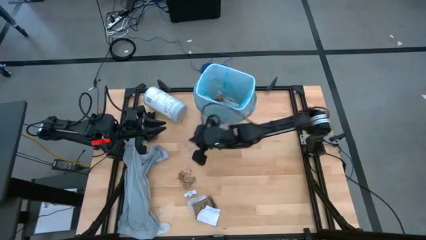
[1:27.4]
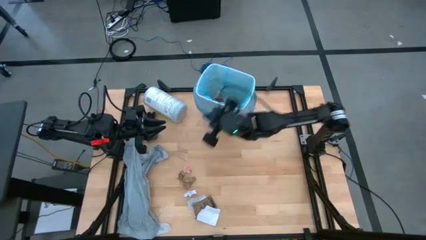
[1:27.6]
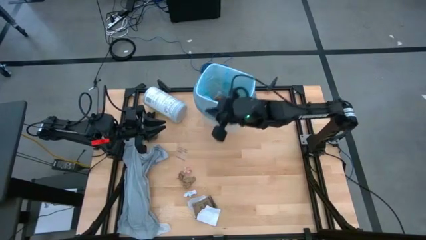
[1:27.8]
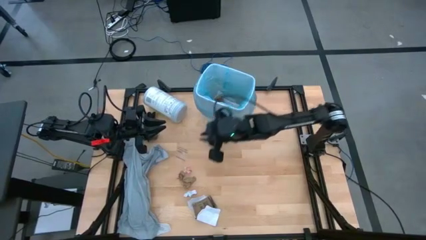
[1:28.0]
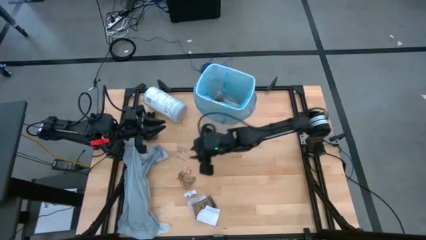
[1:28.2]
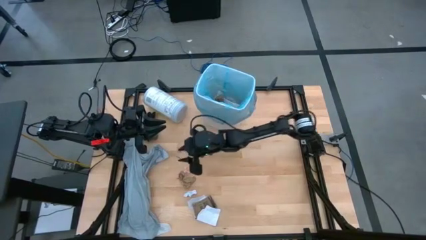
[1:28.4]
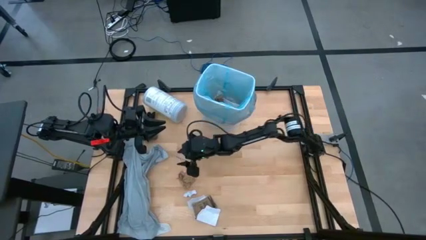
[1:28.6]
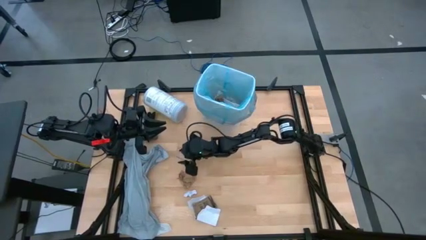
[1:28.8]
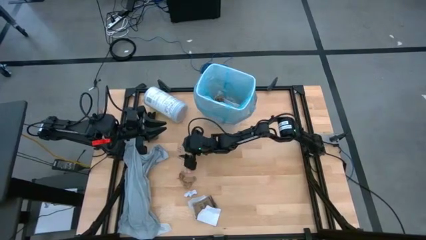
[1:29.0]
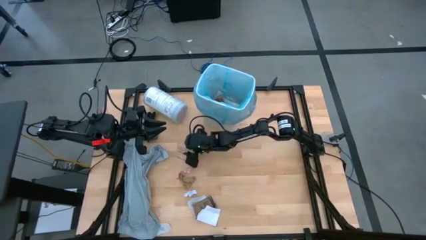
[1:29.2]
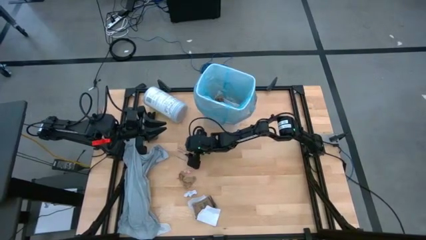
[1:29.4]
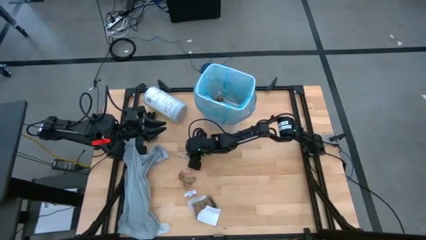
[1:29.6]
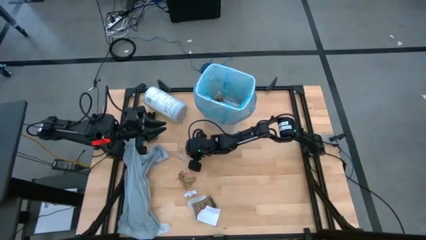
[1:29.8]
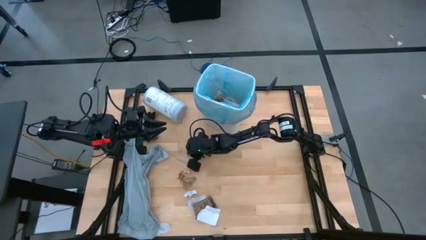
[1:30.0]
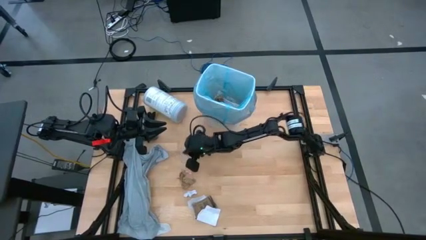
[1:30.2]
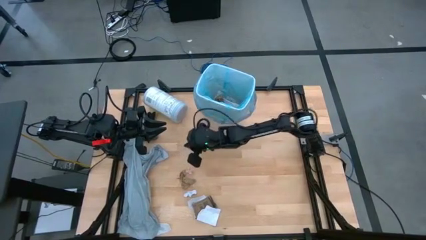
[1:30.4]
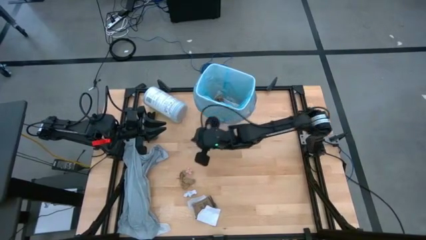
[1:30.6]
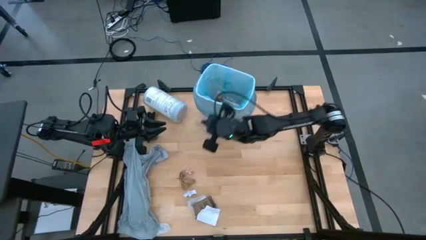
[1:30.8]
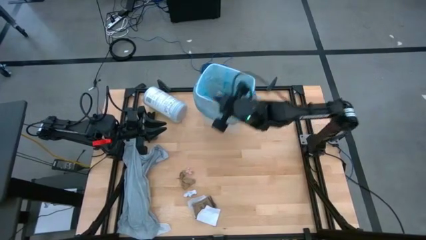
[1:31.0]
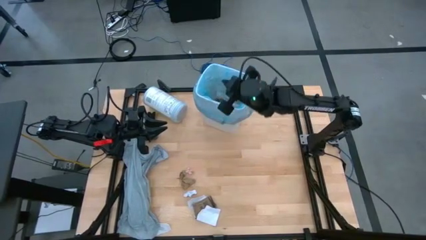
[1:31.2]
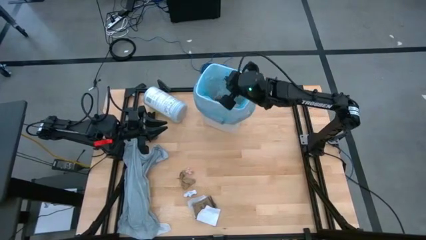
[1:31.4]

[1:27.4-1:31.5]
Task: place trash/remove bag and relplace
Put the transparent plastic into the trash bin

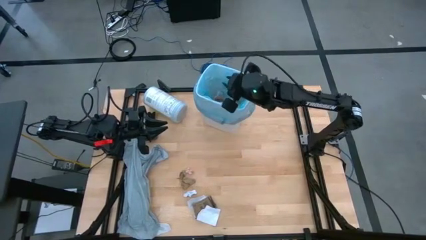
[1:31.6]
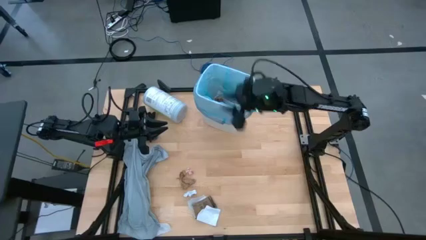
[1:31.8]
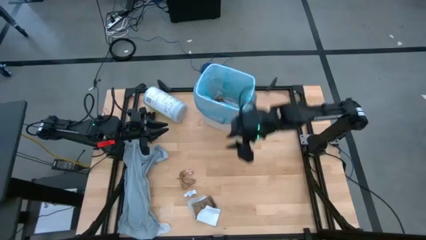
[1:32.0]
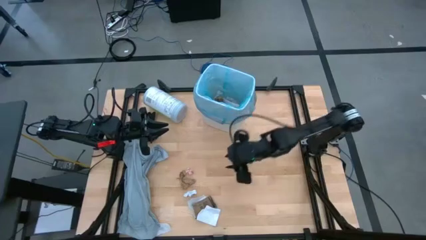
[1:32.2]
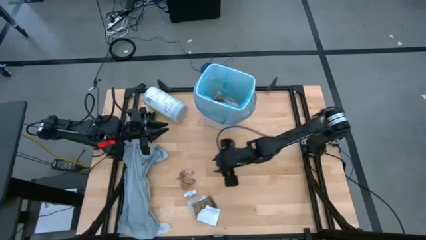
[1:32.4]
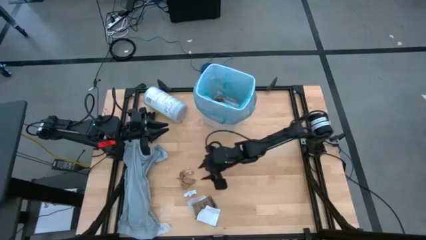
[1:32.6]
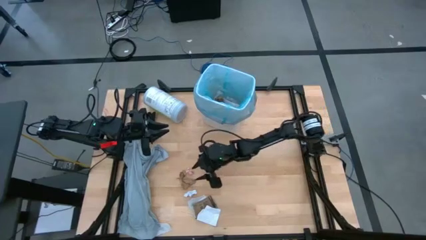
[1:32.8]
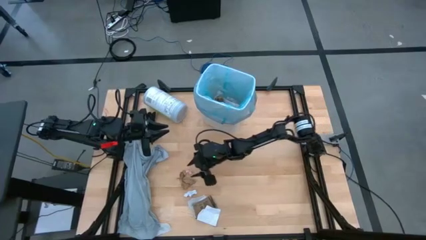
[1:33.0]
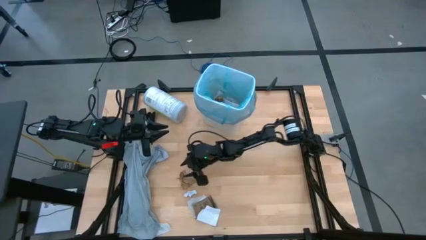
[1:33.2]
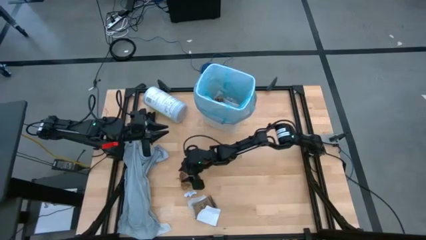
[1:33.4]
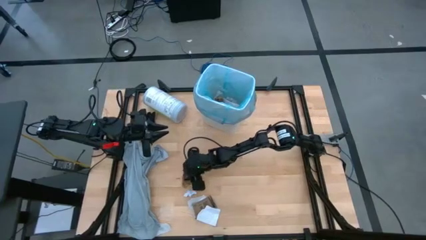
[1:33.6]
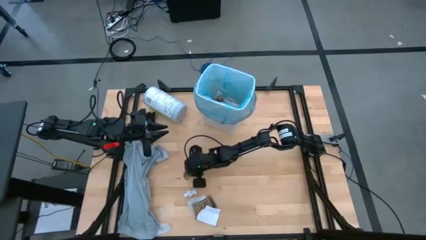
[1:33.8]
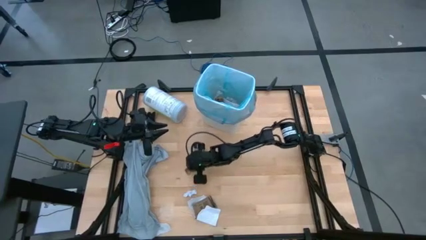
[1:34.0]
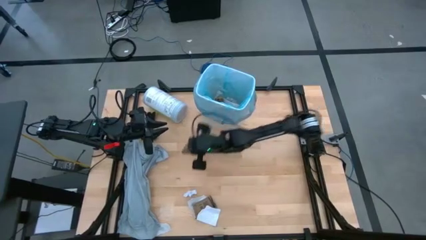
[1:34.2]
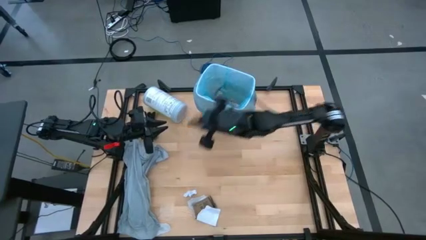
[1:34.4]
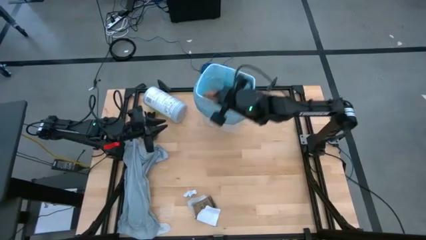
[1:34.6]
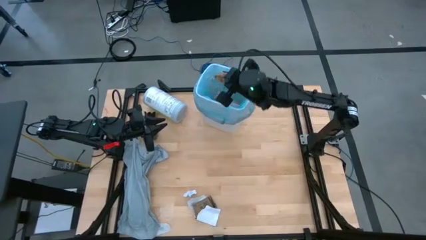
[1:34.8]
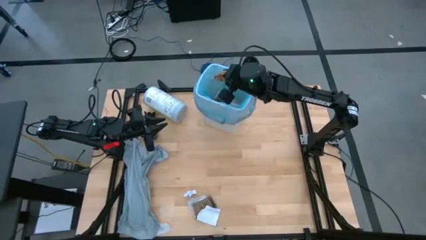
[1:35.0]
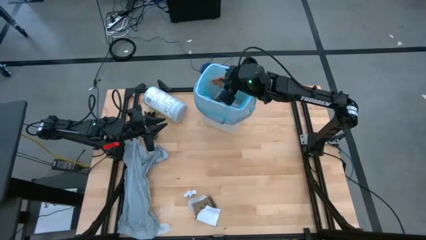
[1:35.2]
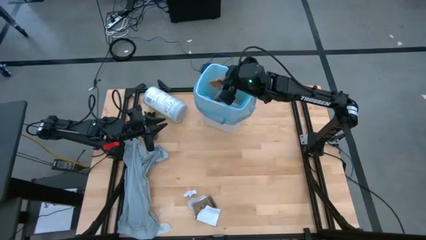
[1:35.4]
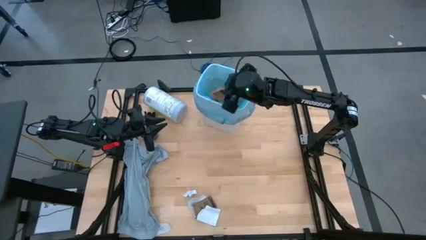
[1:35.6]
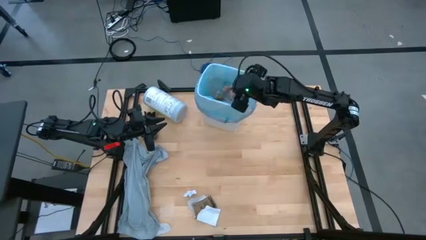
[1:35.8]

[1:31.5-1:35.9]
Put the brown napkin into the trash bin

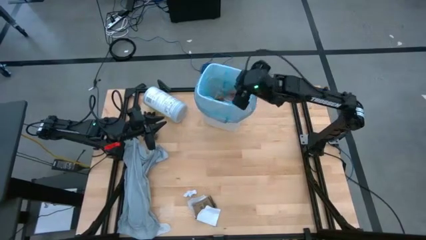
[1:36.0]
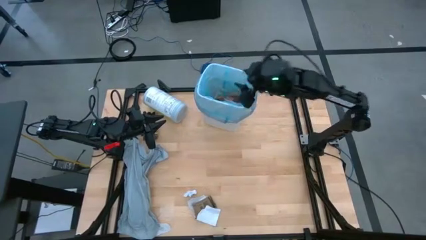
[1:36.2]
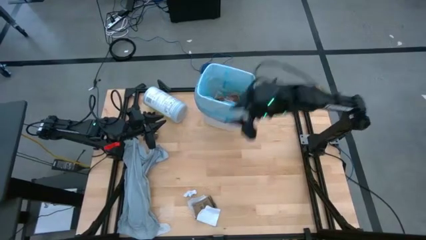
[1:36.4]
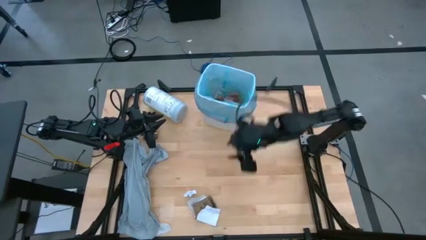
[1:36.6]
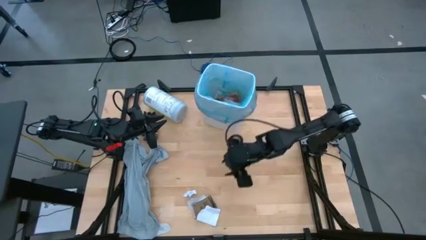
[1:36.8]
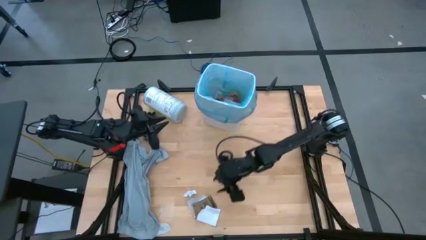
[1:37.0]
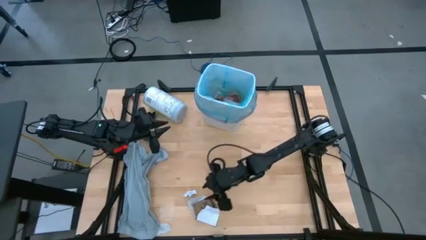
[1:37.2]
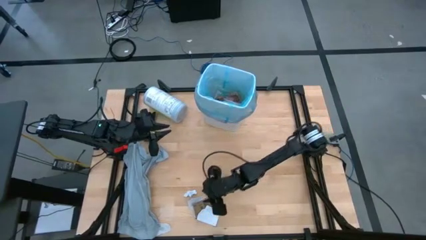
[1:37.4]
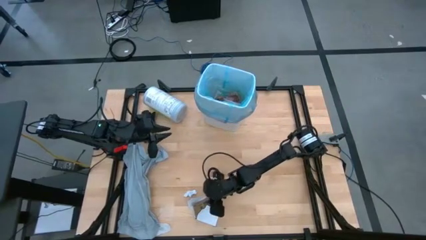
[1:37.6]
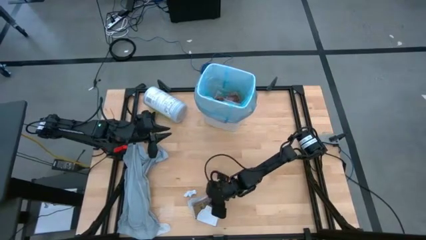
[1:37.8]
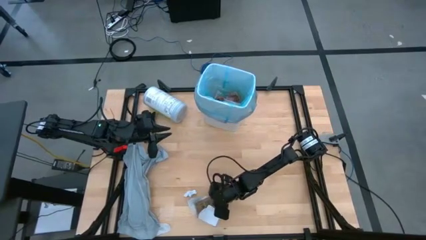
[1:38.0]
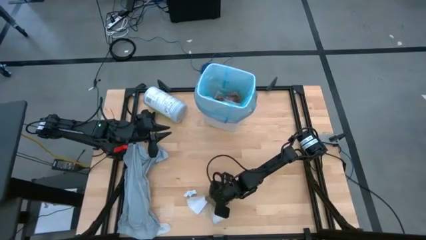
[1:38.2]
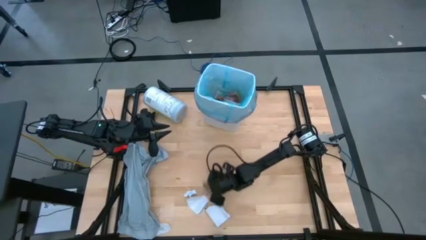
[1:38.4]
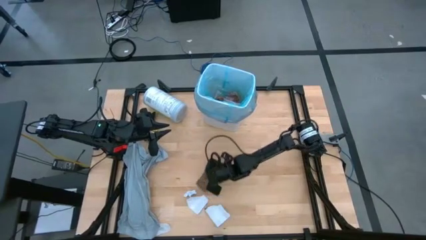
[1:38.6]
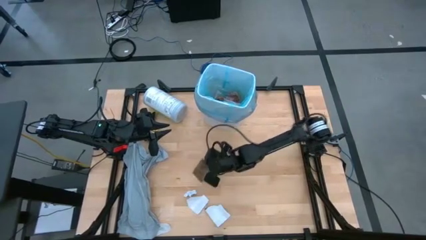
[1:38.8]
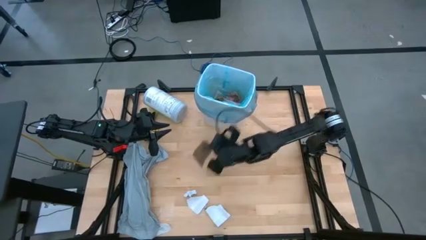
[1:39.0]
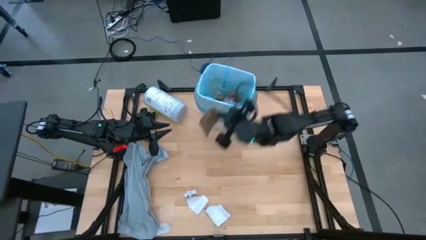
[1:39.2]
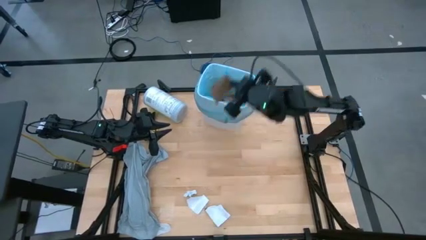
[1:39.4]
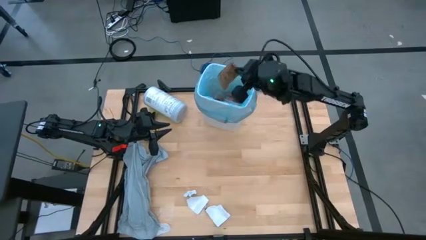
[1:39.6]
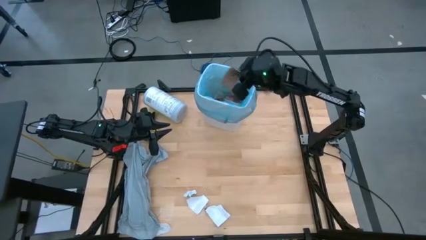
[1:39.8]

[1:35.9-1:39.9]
Put the brown paper into the trash bin

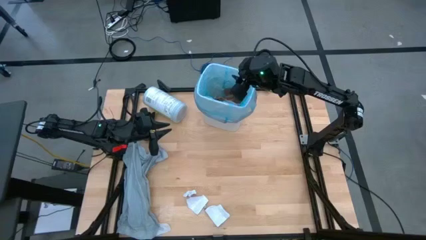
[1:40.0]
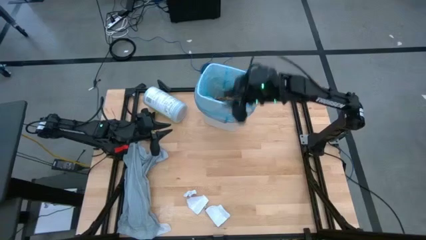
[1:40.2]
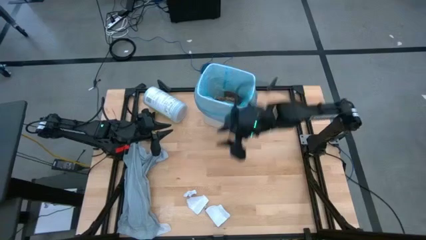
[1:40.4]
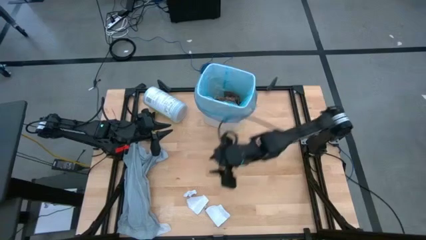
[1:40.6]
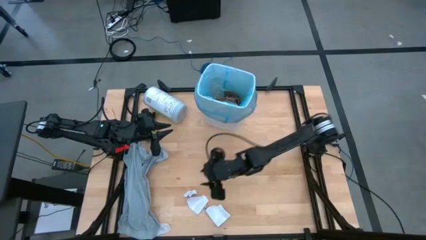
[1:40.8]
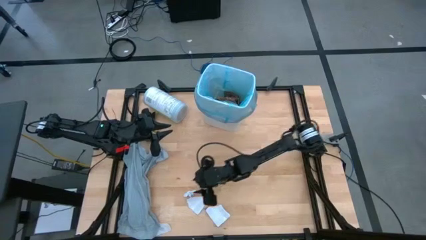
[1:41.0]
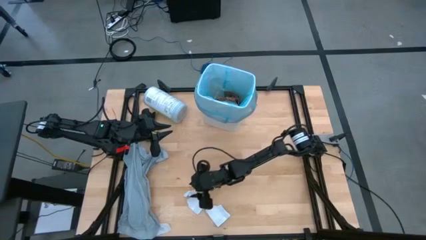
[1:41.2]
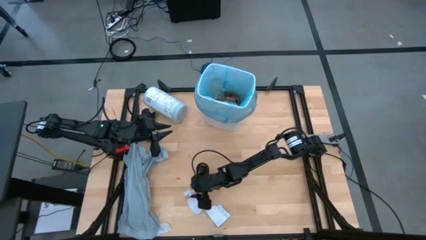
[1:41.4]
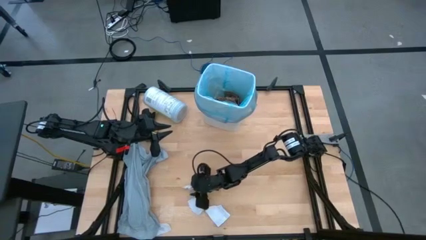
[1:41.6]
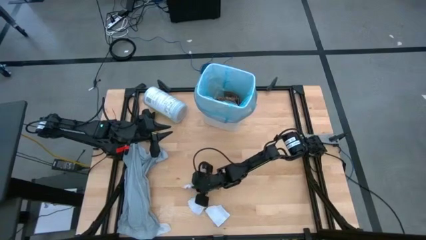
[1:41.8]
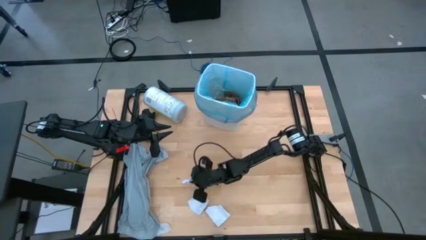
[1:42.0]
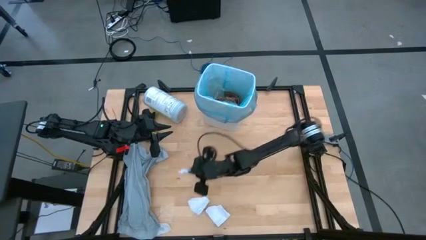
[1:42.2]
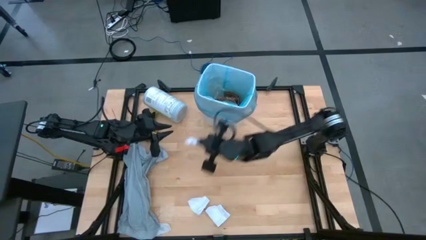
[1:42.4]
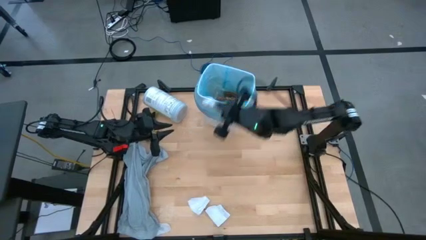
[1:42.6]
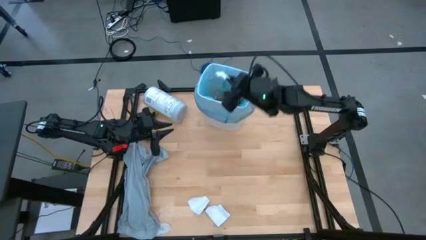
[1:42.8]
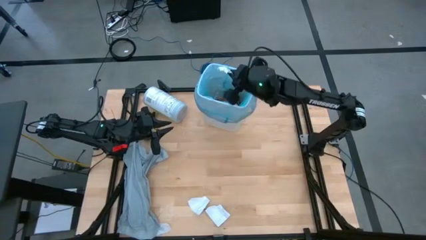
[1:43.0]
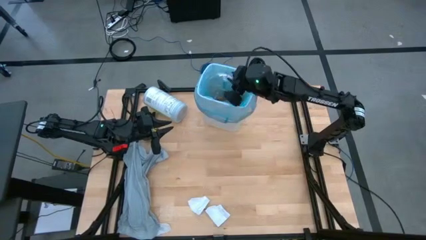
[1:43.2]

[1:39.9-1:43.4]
Put the white paper into the trash bin

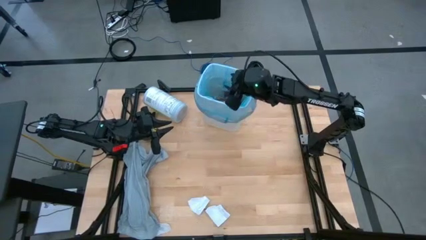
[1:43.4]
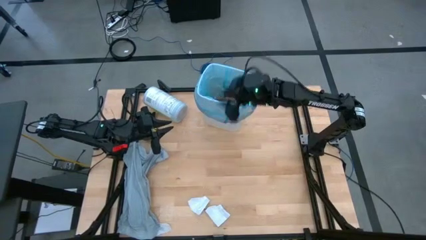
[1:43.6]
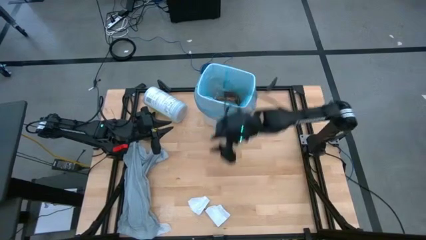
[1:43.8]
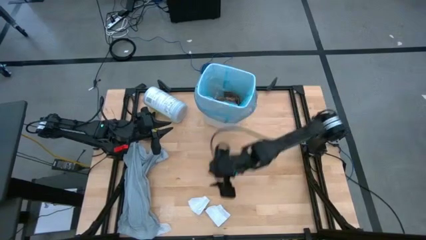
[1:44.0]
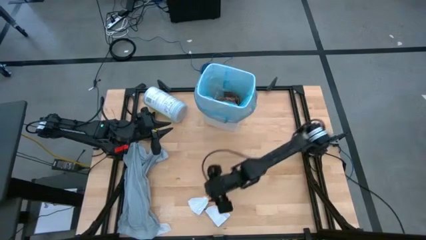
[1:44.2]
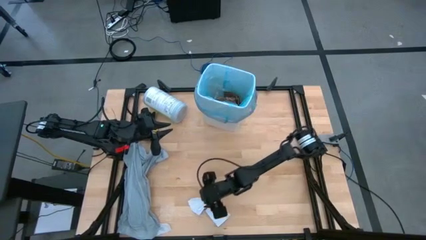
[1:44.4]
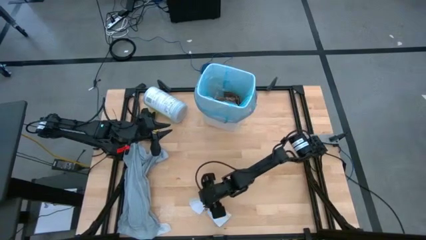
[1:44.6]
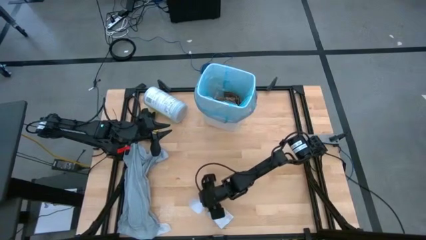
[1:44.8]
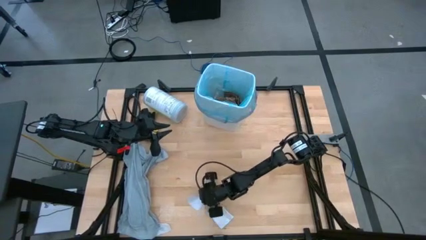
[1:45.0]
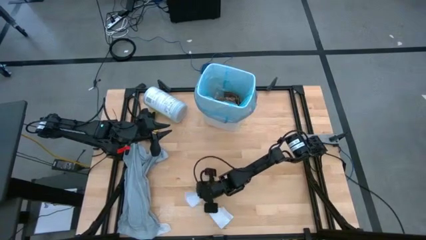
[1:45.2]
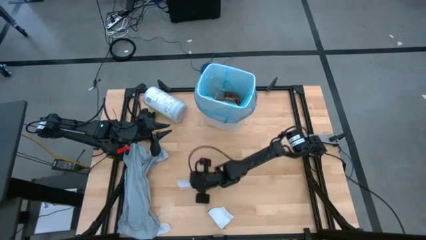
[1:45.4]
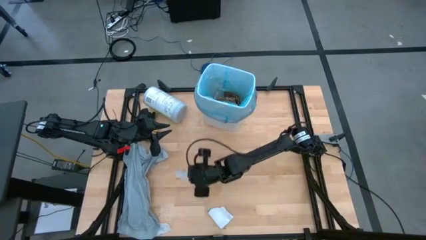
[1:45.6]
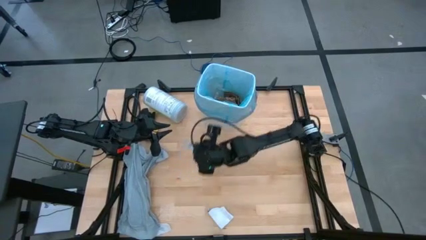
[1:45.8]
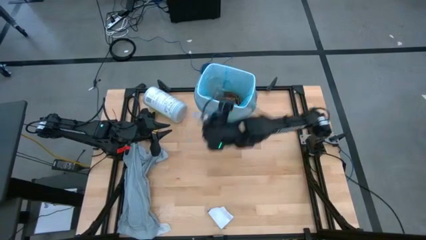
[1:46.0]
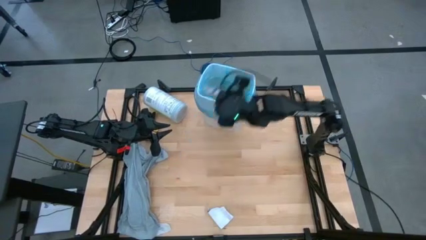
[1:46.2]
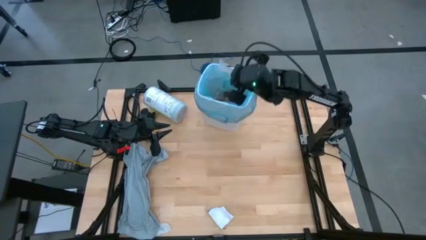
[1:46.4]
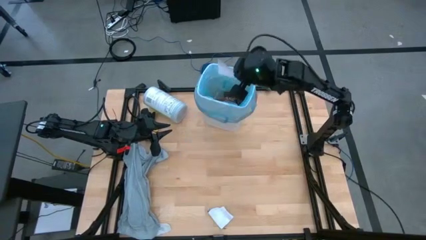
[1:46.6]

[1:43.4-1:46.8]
Put the white paper into the trash bin
